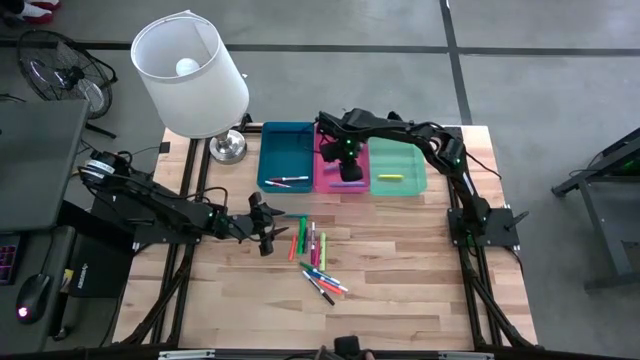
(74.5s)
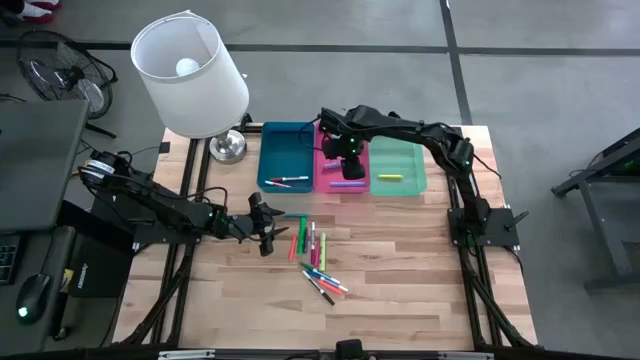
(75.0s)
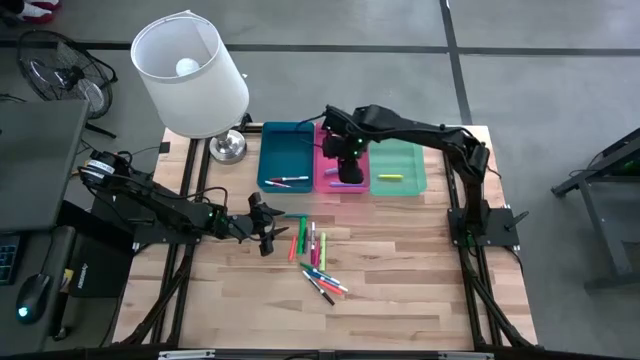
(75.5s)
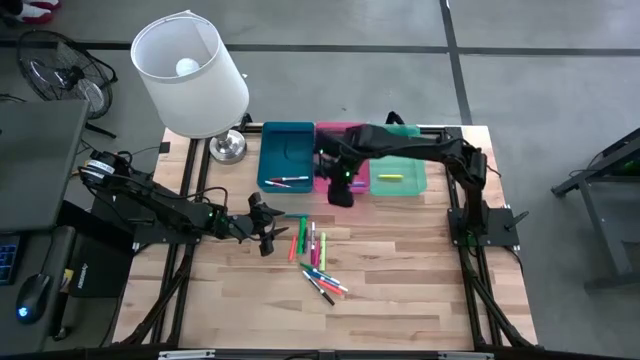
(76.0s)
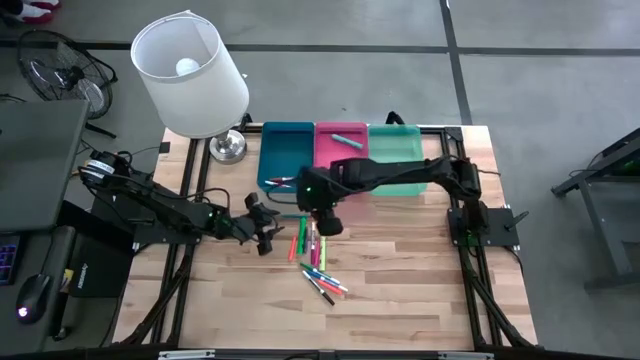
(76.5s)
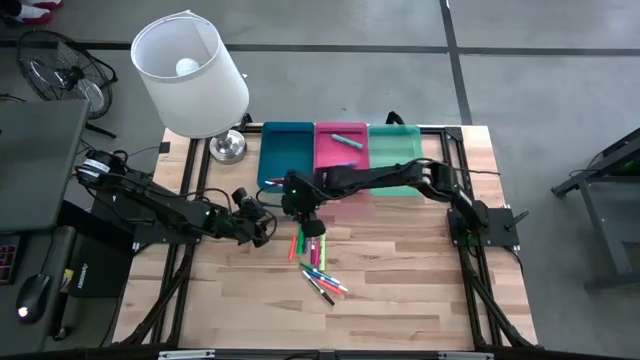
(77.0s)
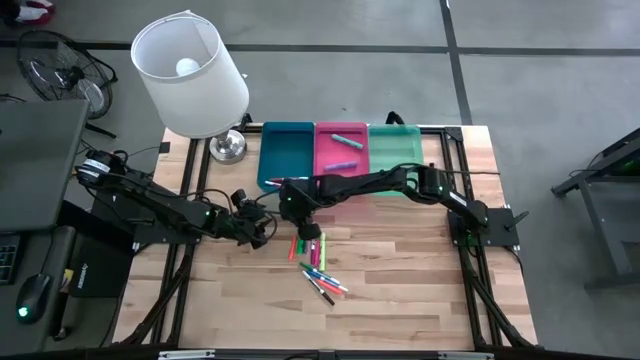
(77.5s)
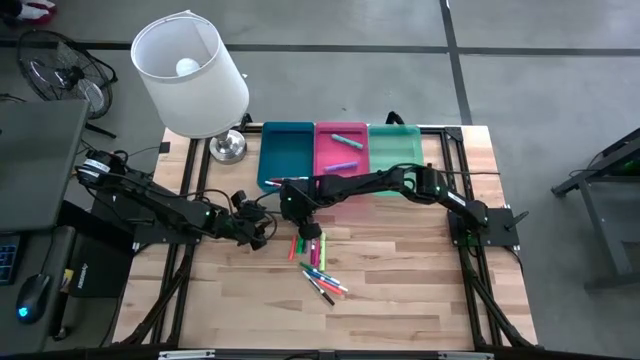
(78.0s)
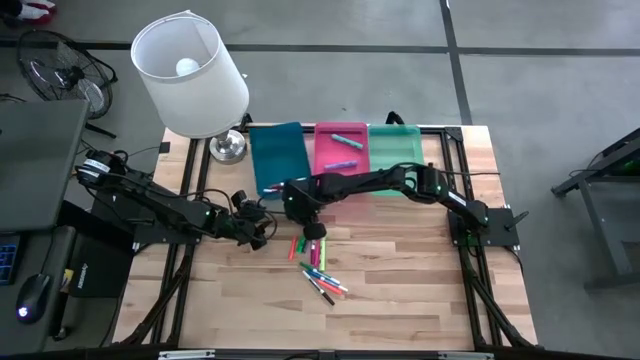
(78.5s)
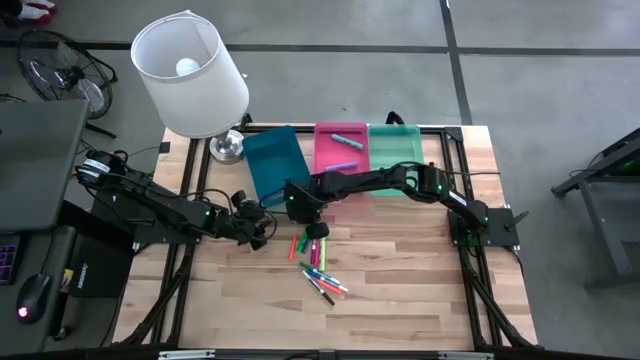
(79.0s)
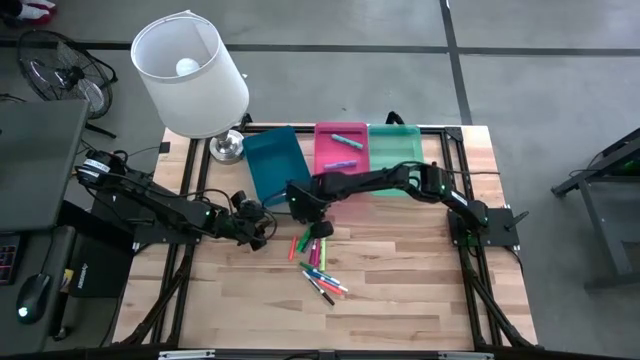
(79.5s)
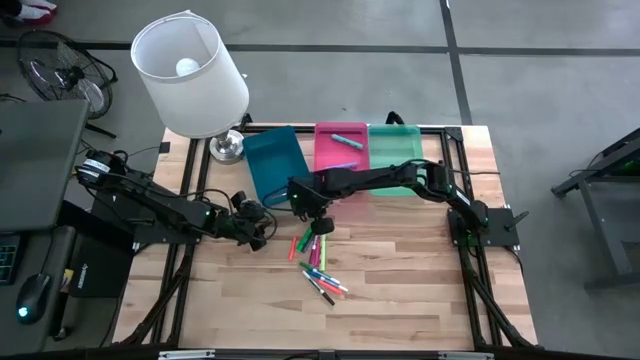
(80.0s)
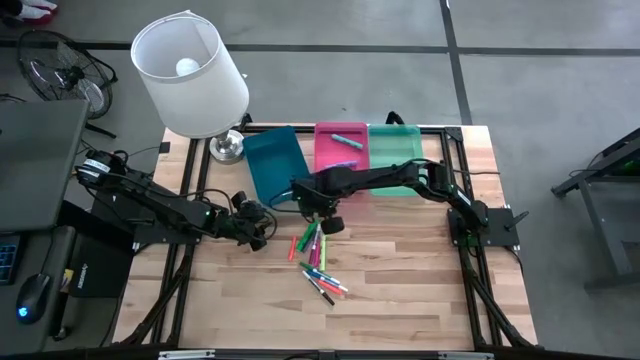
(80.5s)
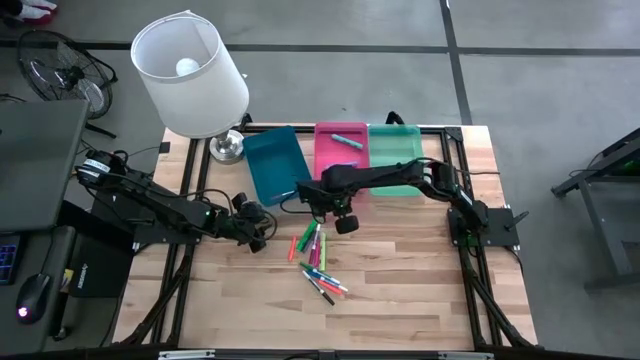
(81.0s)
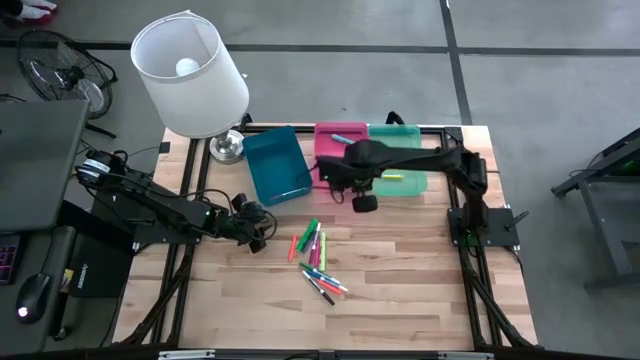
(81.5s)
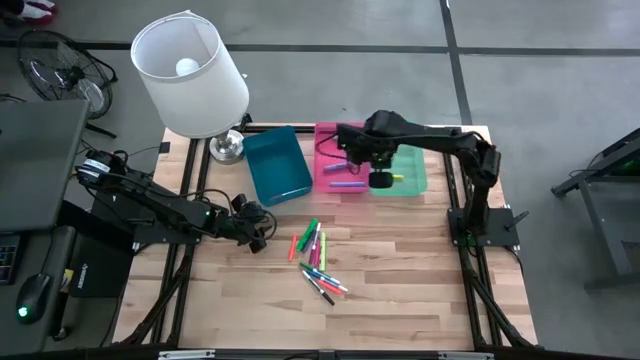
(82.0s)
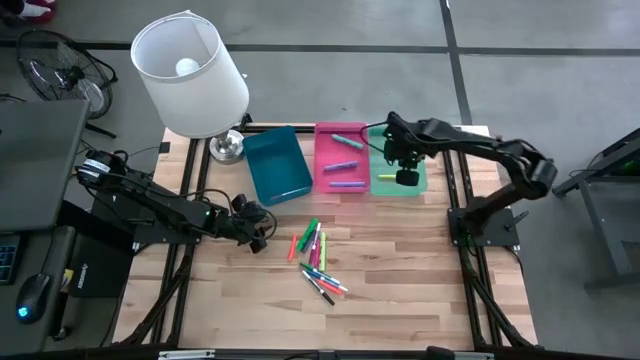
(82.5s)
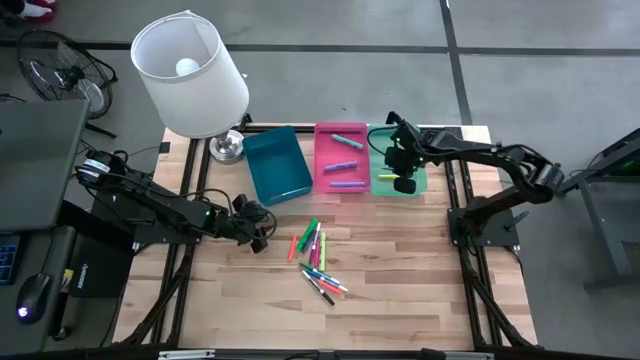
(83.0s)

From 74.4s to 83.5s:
Task: Pick & Place Markers
Put the blue pen into the green bin

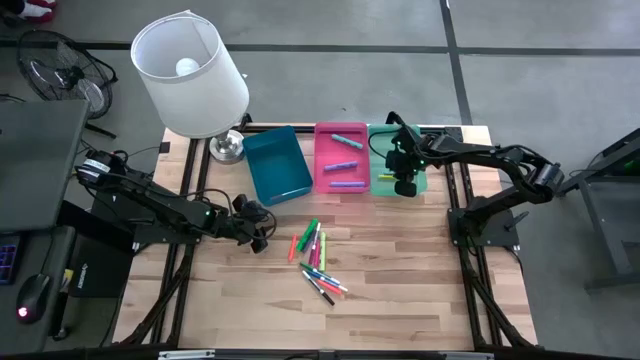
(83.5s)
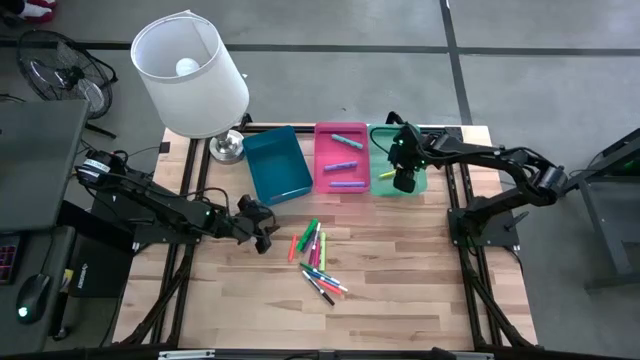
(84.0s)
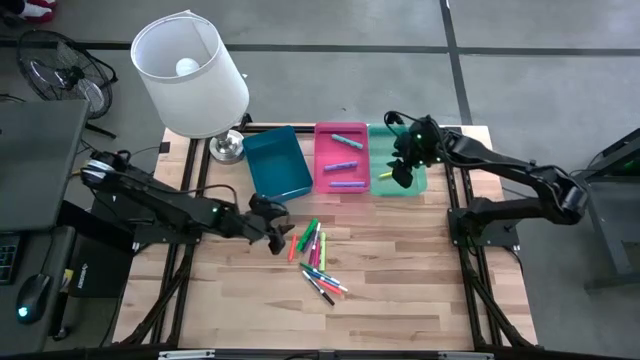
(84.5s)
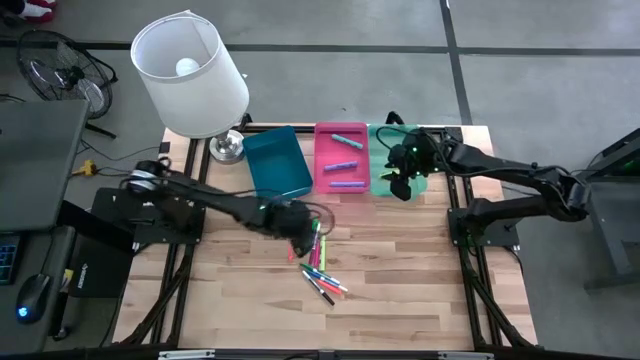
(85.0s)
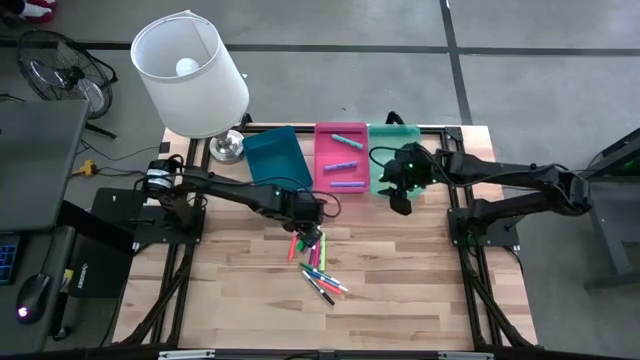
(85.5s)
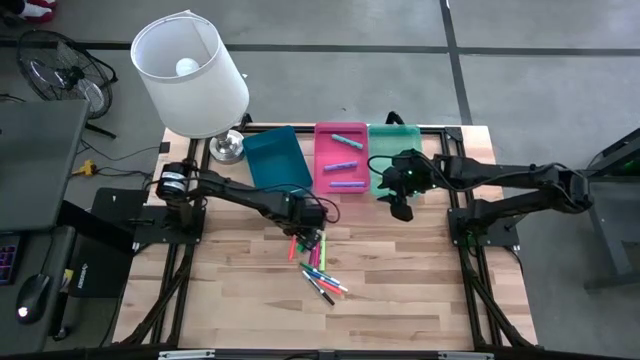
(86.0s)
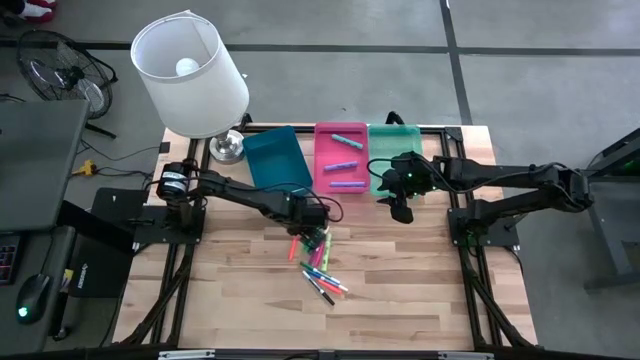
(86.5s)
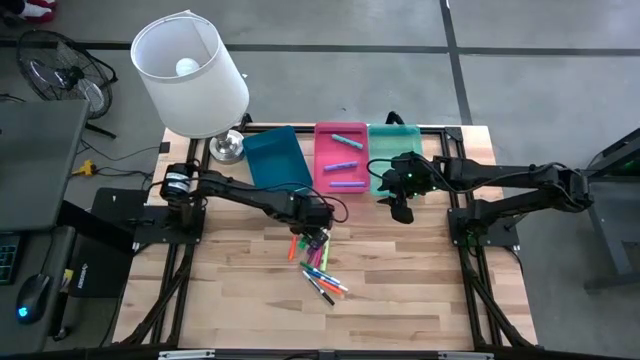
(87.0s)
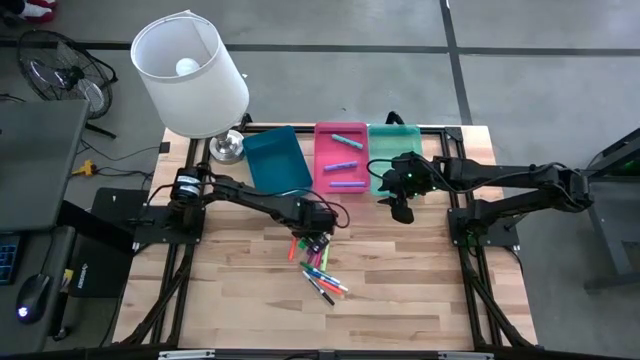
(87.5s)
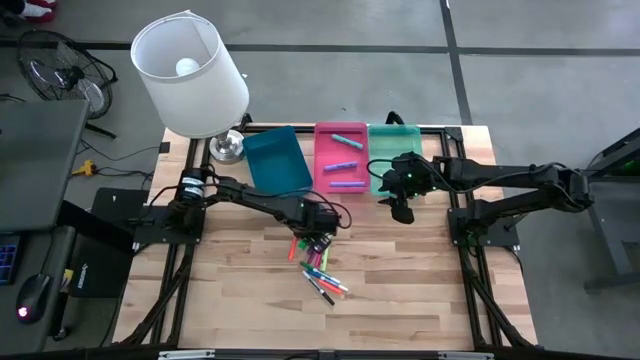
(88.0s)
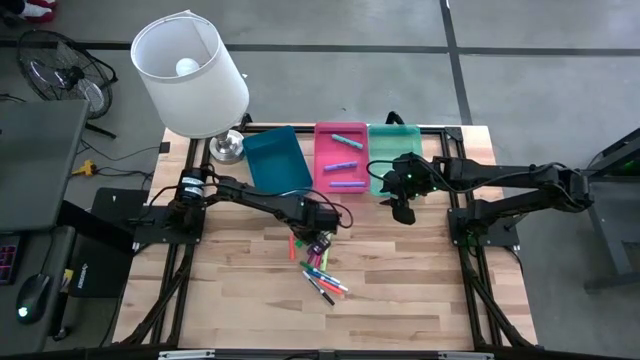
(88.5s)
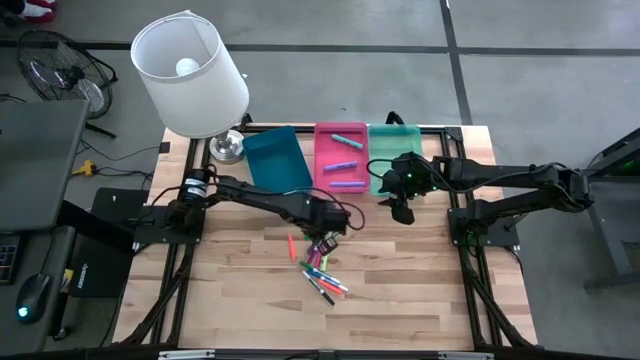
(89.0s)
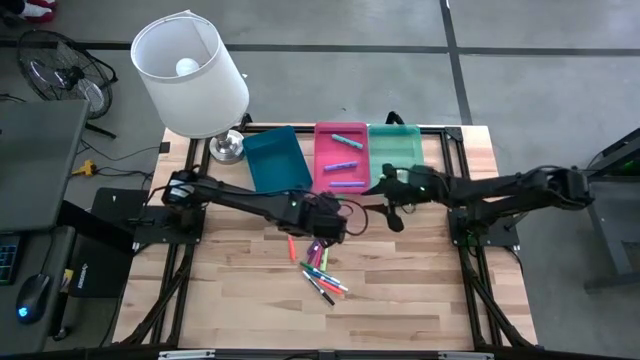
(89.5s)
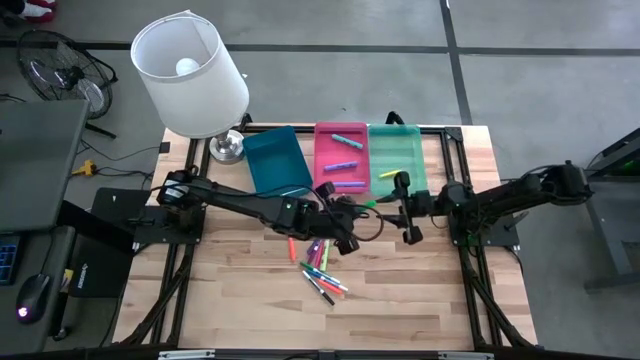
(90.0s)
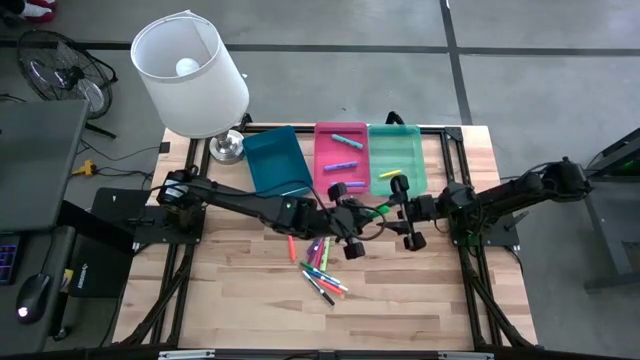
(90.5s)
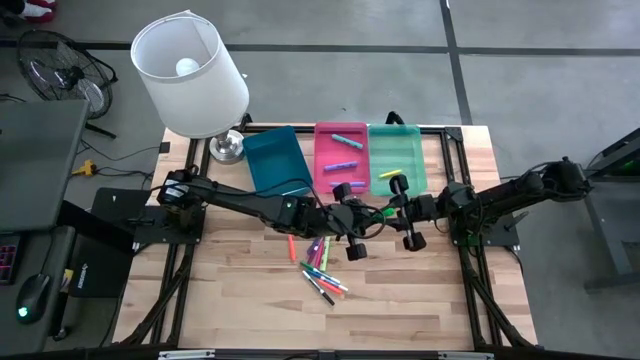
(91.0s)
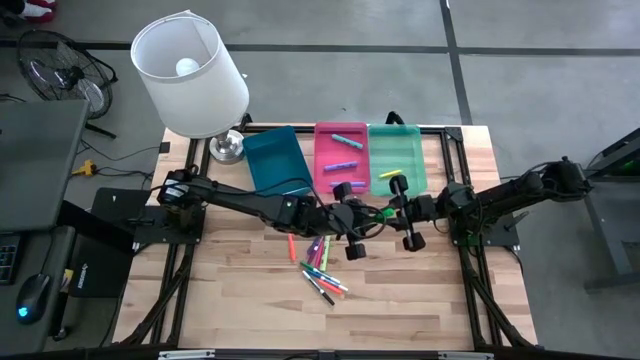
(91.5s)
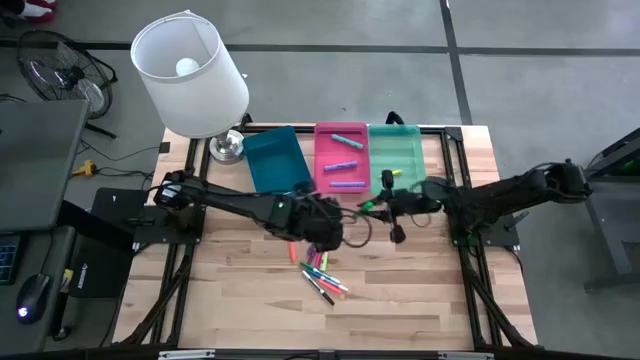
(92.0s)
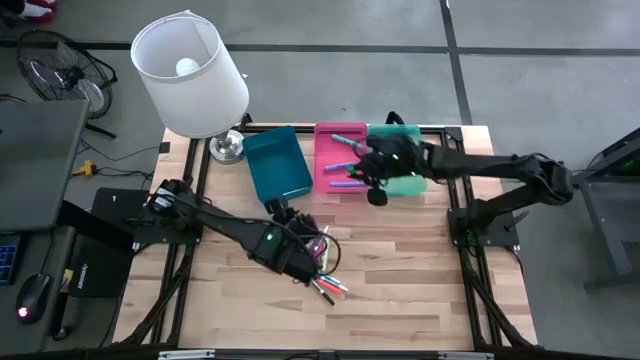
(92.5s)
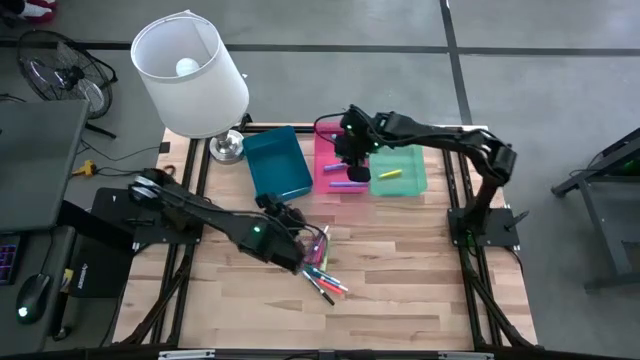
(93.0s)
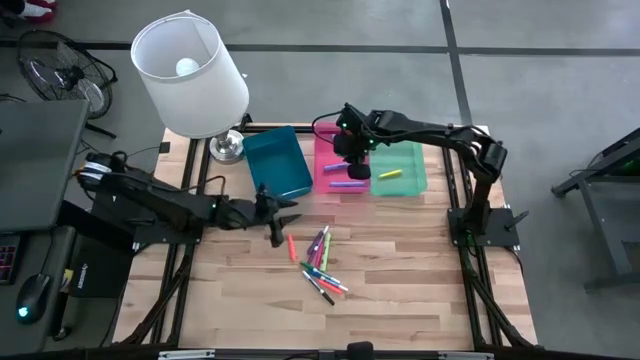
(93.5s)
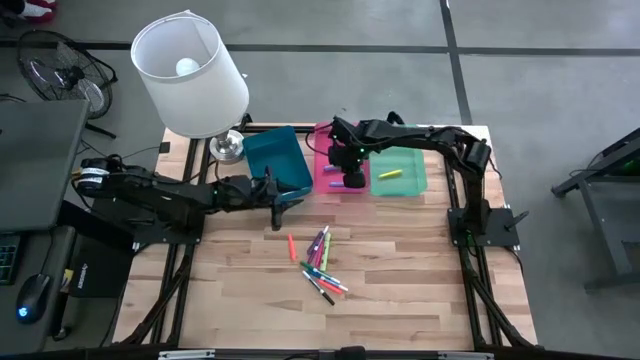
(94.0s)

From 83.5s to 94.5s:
Put the green highlighter into the pink bin
